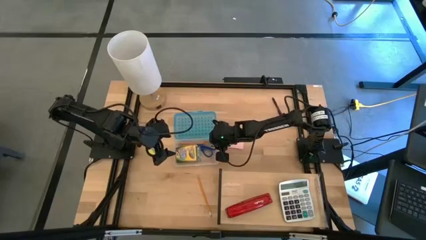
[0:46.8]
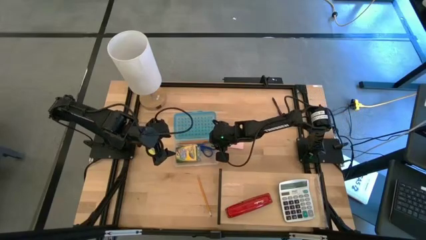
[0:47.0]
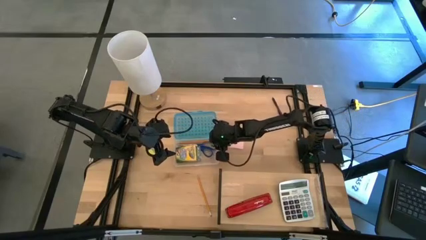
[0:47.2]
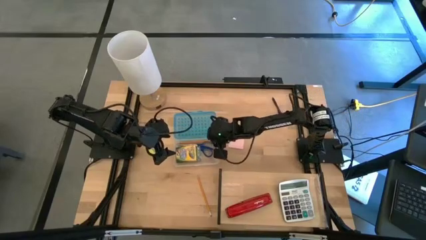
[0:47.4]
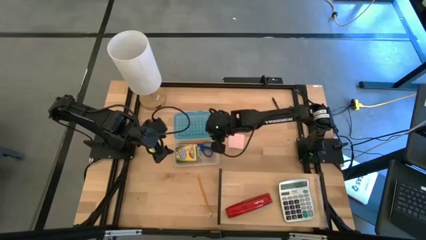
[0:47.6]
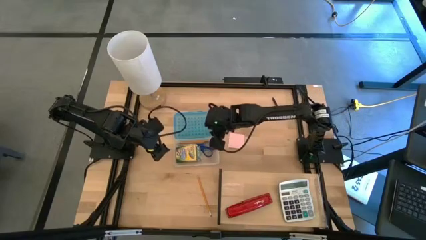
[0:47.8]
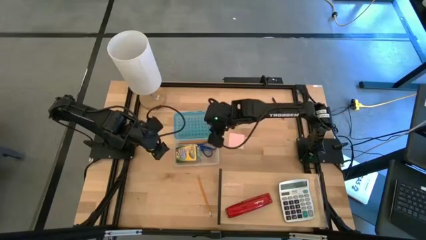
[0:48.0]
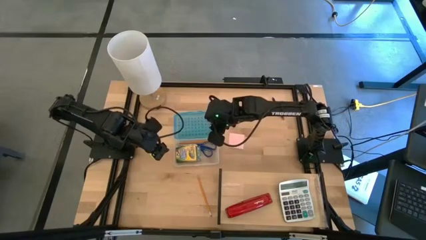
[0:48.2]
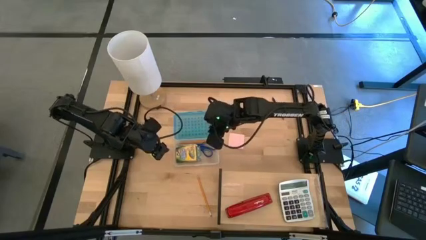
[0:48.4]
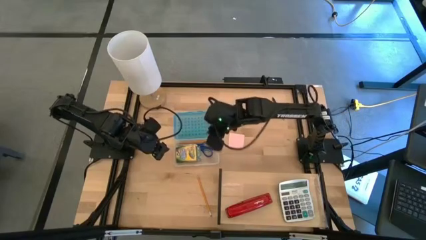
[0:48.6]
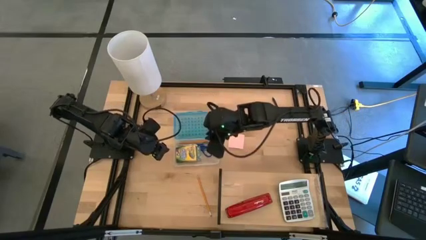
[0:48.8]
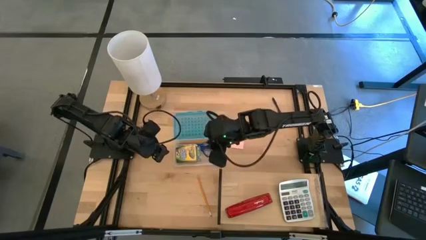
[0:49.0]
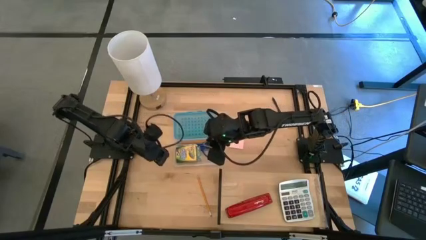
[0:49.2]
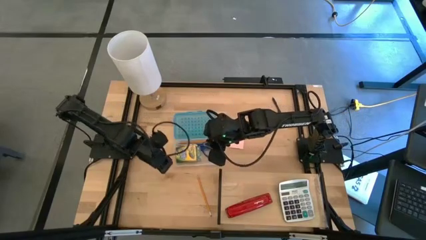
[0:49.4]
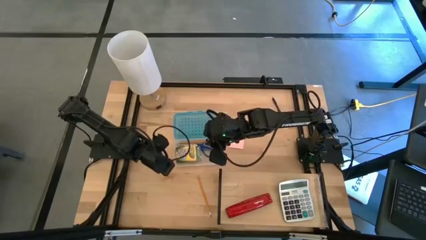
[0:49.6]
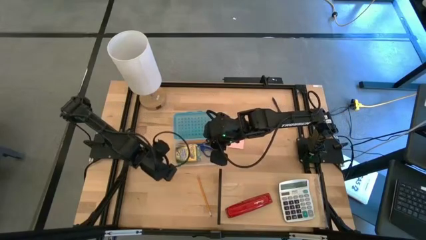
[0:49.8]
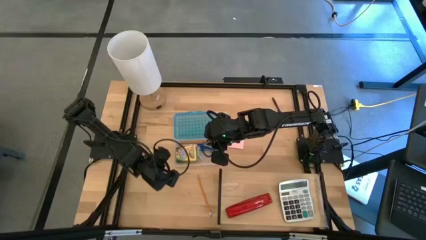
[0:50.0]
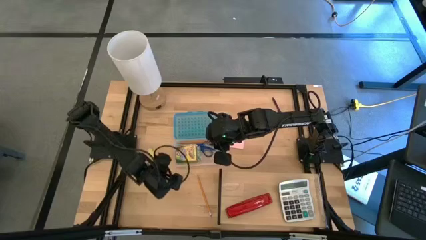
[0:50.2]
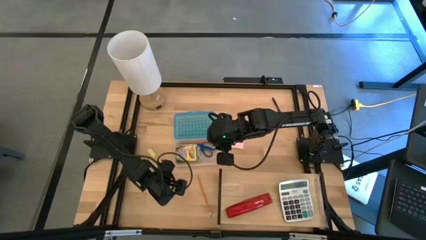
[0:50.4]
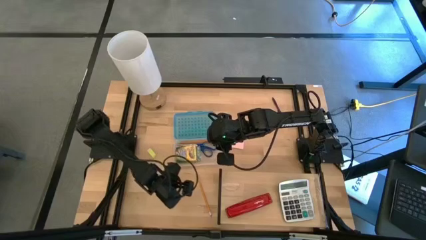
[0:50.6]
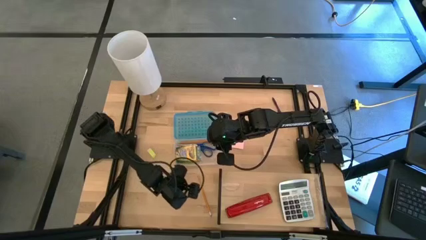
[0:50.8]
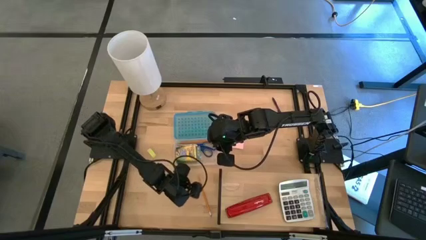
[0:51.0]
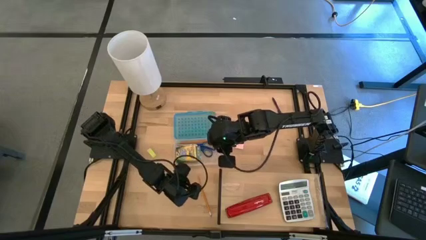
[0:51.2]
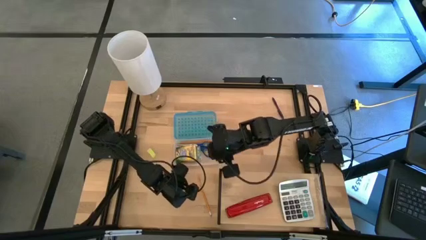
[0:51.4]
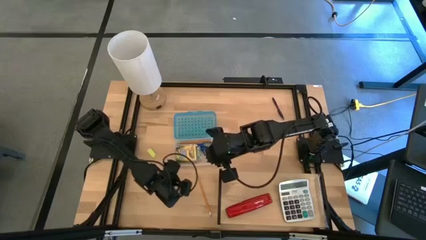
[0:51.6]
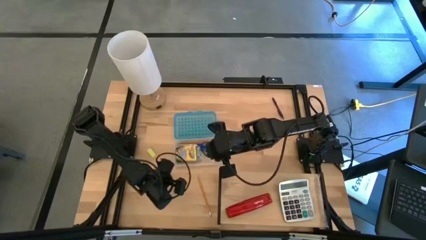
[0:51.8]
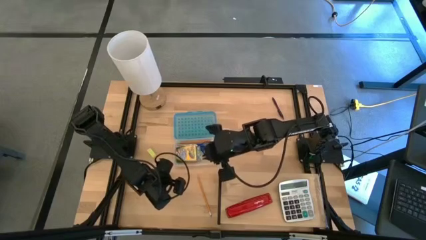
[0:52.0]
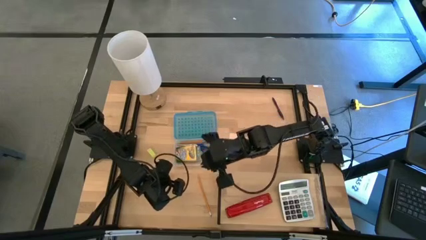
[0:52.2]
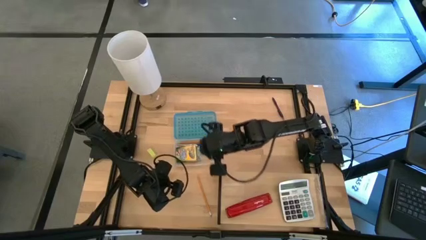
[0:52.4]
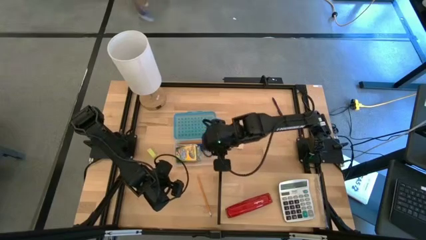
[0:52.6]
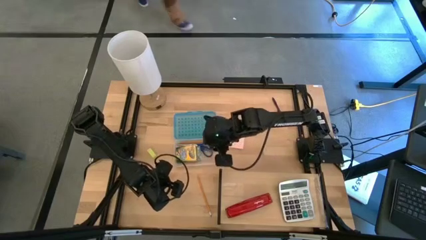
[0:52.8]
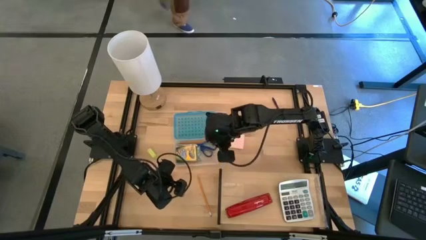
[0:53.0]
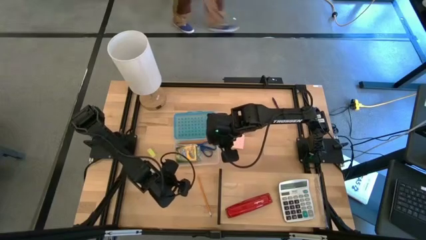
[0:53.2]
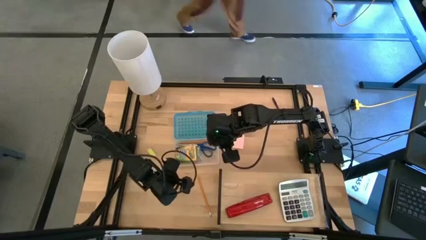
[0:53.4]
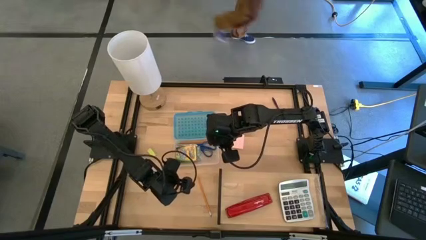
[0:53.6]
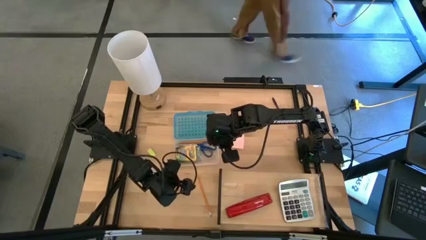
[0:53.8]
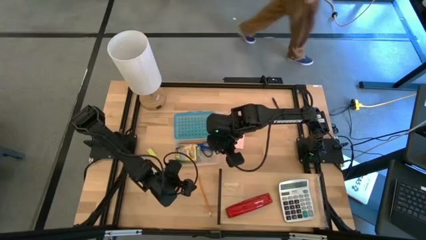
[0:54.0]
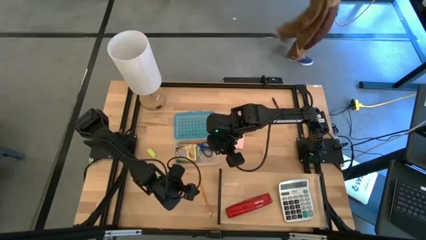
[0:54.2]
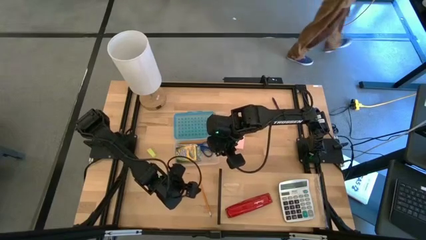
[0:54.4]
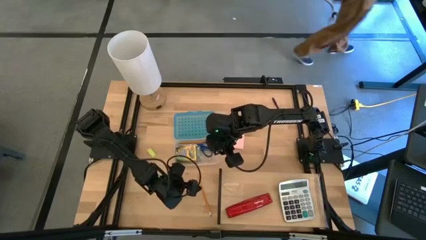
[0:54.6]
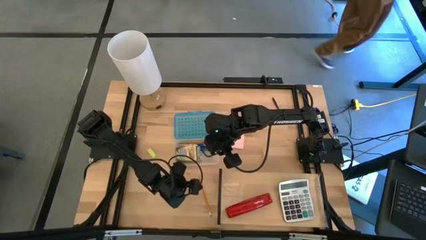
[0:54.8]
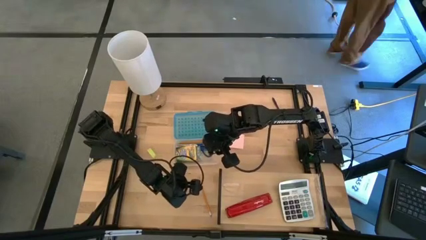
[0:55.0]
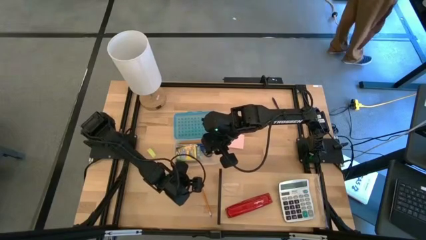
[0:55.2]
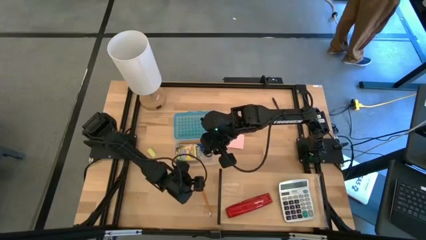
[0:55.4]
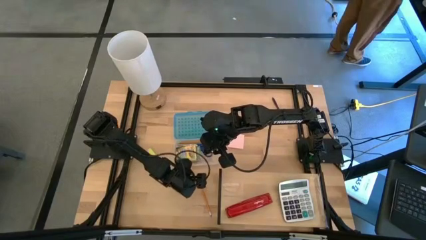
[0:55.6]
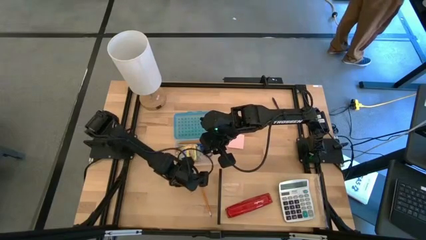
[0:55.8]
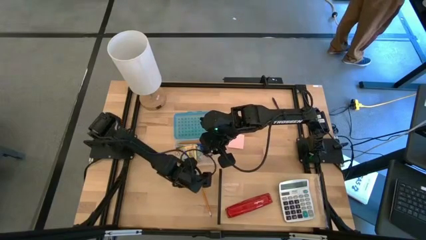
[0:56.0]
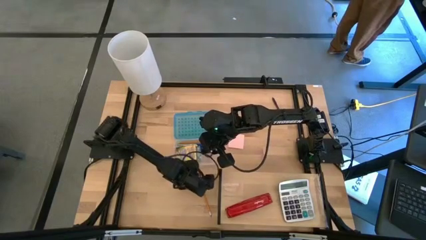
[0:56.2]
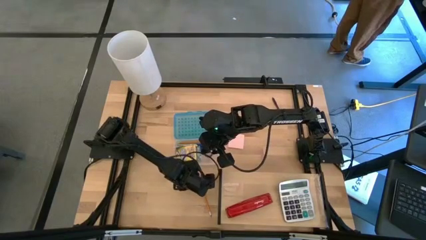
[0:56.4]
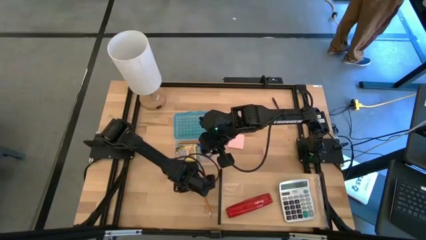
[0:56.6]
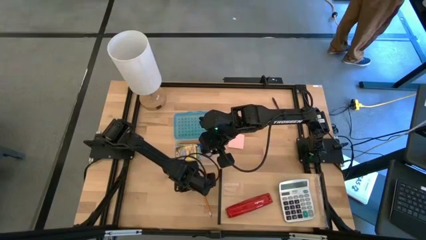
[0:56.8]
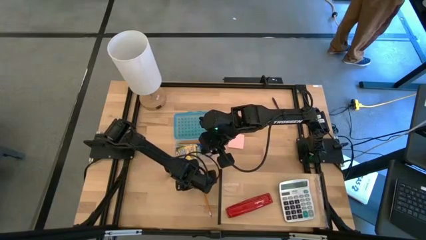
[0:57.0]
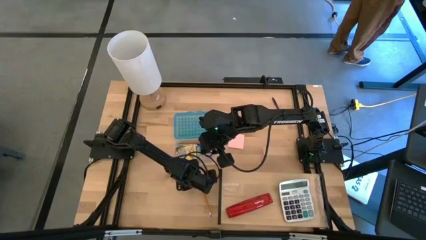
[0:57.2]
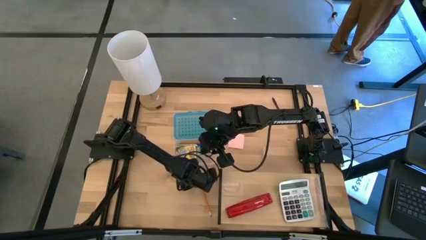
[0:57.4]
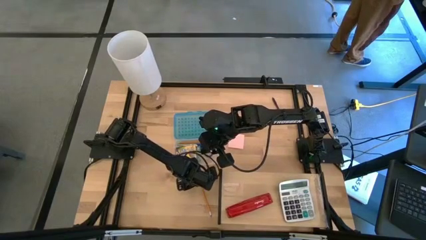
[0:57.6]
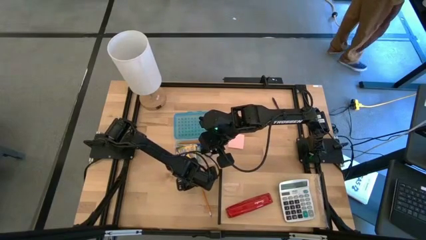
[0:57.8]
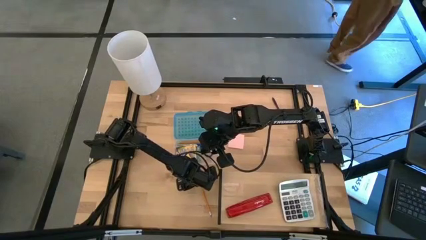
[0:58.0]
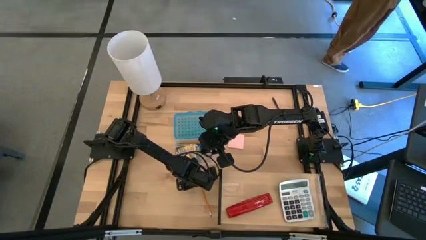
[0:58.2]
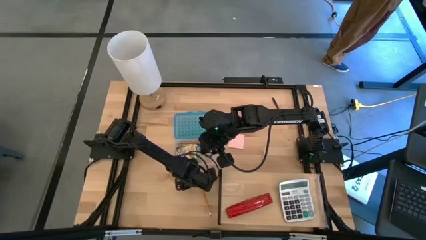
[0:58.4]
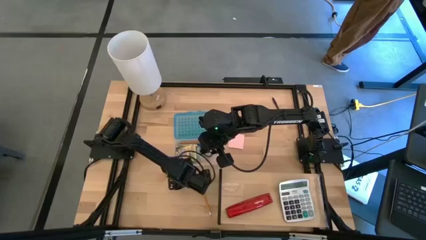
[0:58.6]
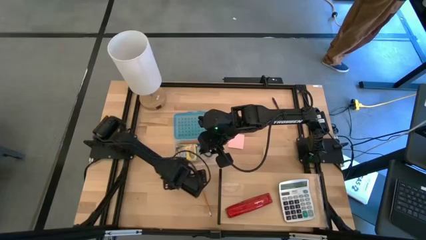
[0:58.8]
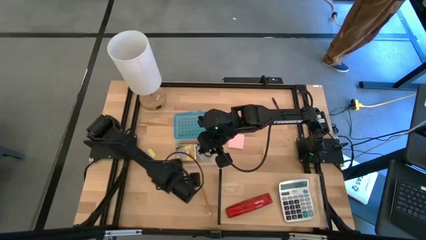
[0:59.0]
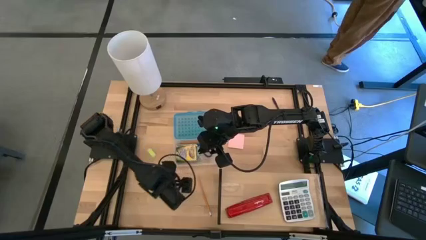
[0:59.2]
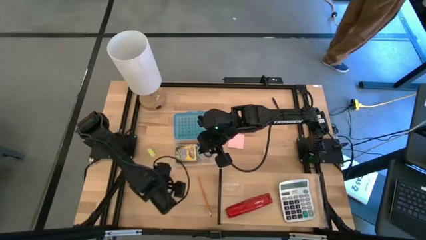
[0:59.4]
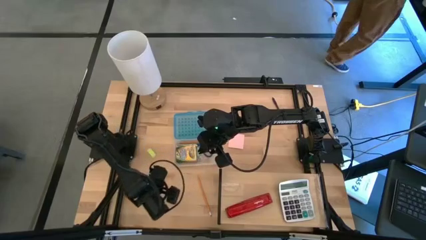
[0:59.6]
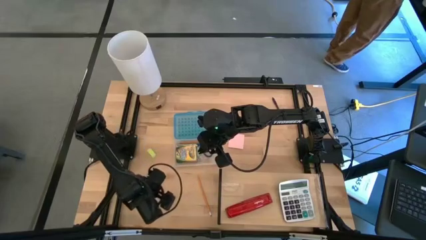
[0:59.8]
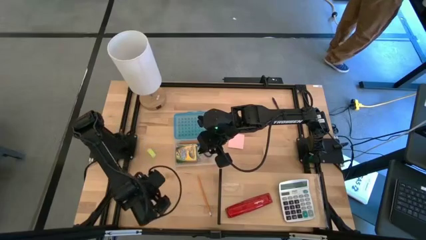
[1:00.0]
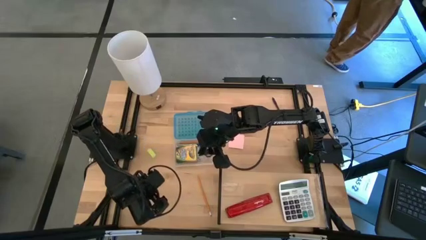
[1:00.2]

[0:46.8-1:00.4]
Task: Pack school essentials
Put the yellow eraser into the blue supply box

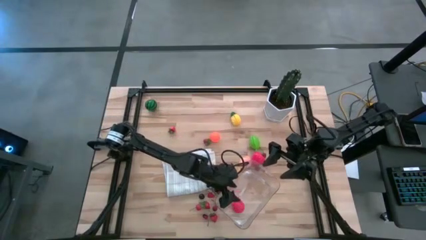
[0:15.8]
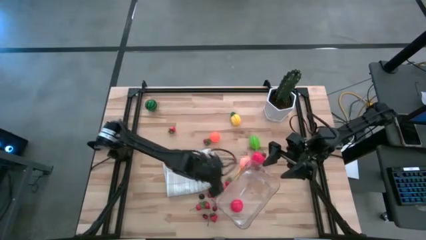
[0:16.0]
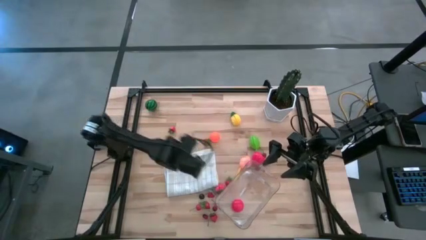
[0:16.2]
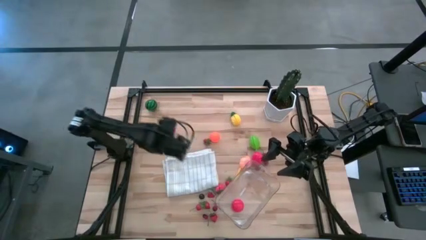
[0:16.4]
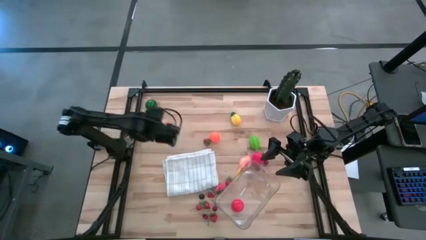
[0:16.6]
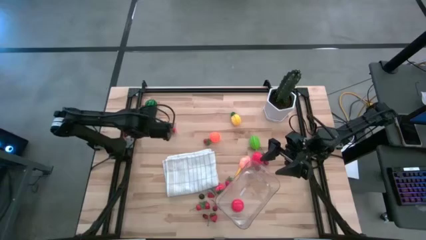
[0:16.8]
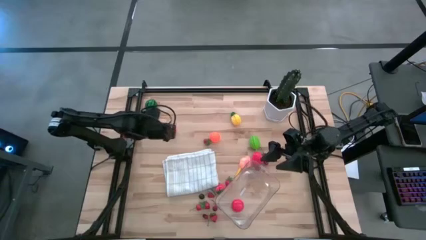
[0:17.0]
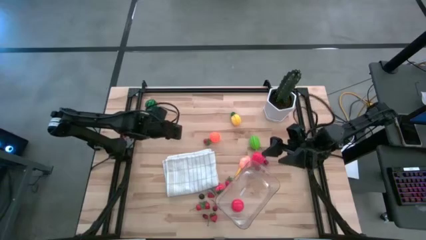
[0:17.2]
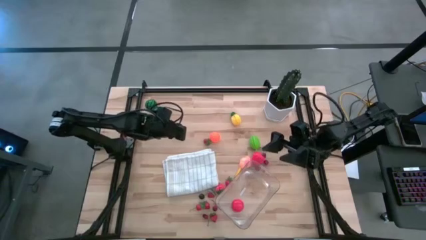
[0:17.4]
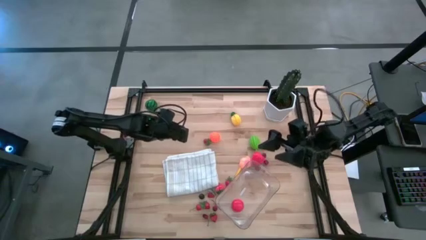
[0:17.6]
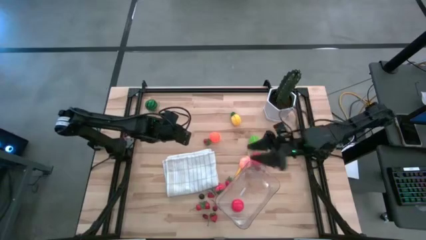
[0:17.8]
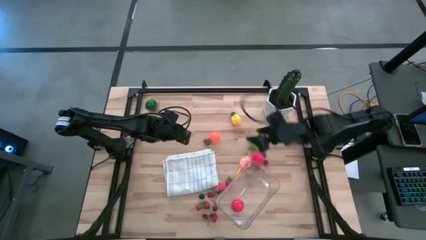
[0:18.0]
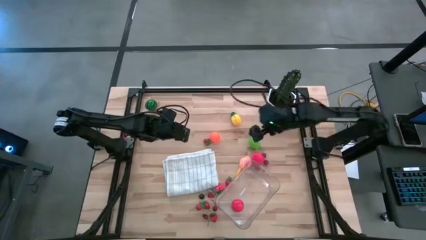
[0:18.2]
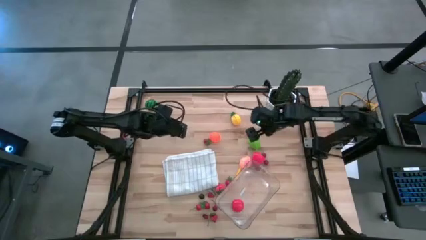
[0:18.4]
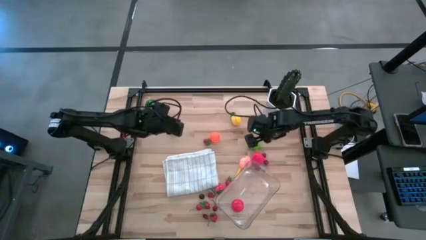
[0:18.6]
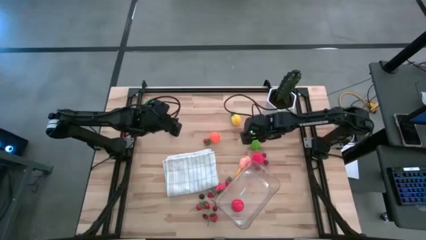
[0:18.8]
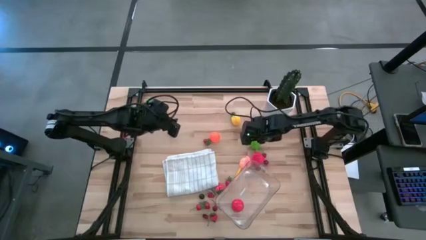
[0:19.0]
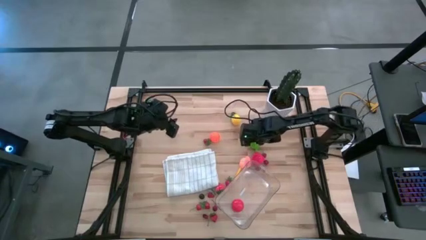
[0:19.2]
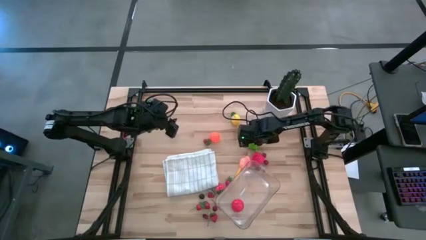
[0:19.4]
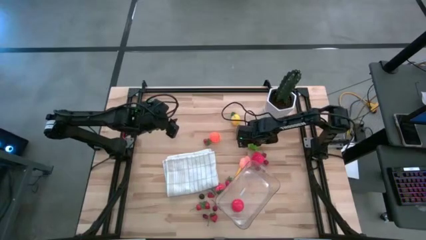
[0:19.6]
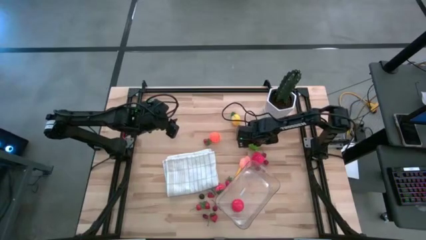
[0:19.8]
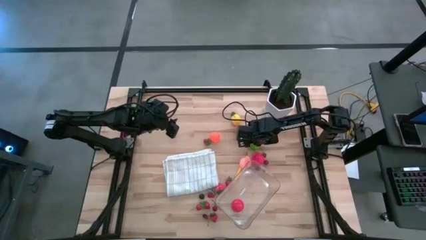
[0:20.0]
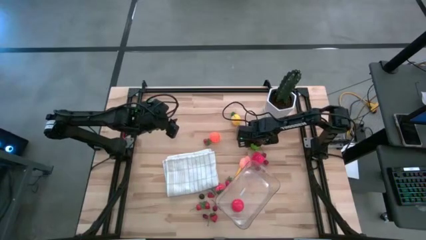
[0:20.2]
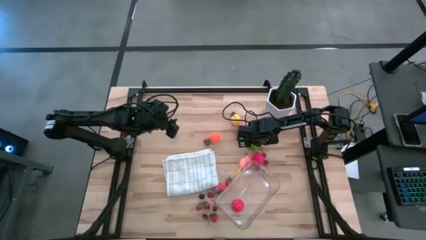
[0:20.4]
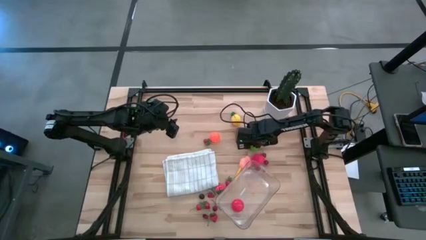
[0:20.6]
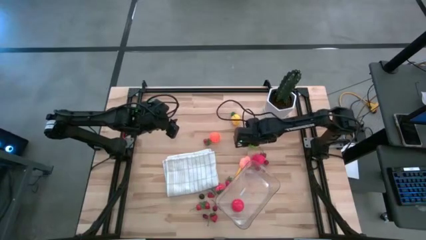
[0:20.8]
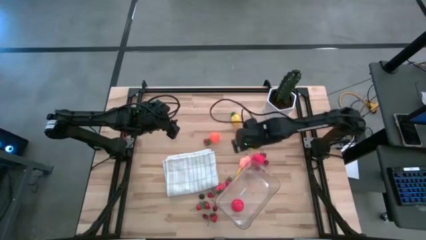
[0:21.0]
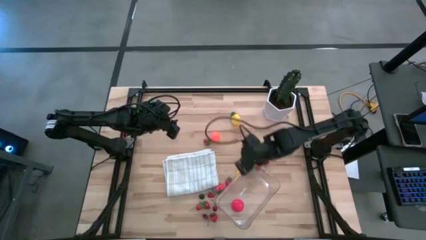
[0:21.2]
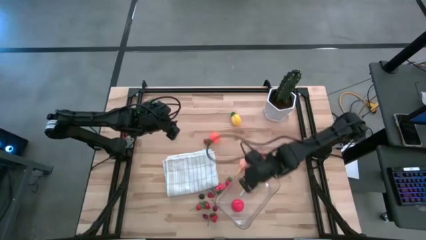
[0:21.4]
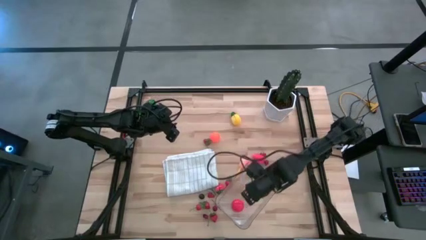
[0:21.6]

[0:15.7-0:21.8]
Task: Pick and placing Produce into tupperware
Put the musk melon into the transparent bin
